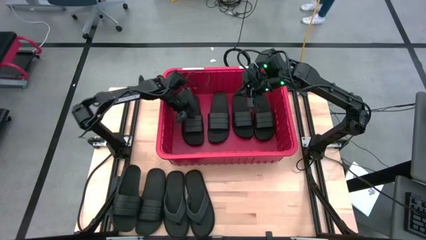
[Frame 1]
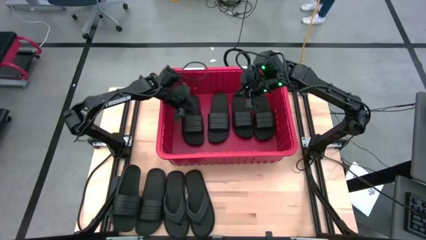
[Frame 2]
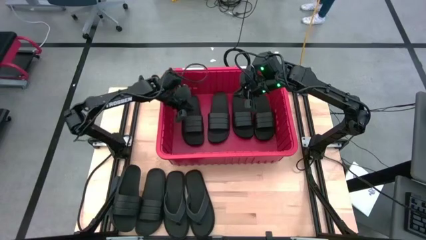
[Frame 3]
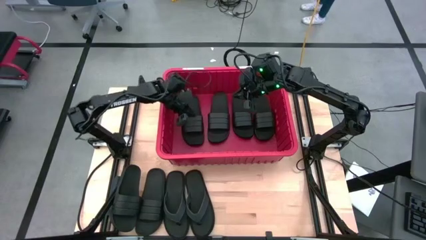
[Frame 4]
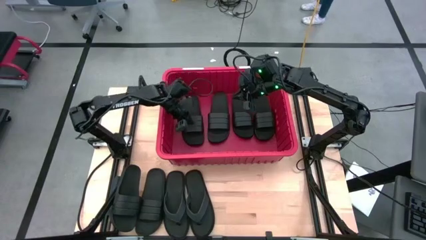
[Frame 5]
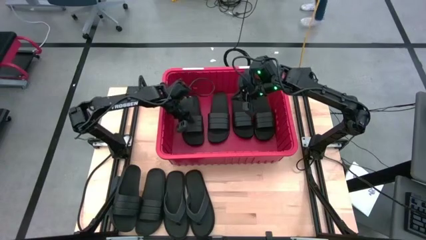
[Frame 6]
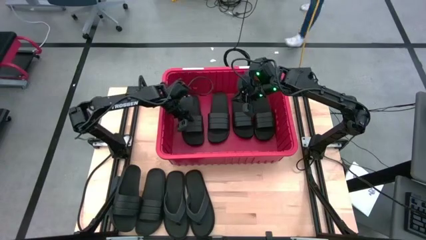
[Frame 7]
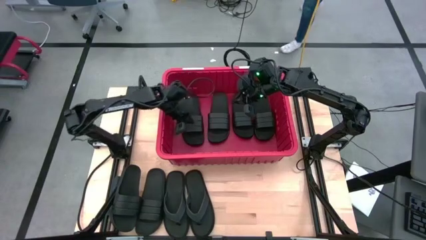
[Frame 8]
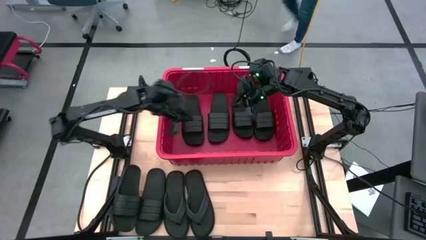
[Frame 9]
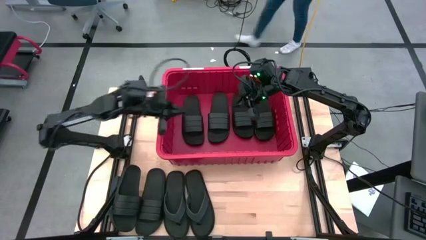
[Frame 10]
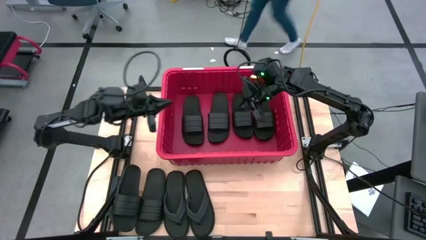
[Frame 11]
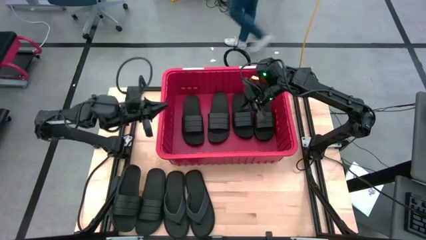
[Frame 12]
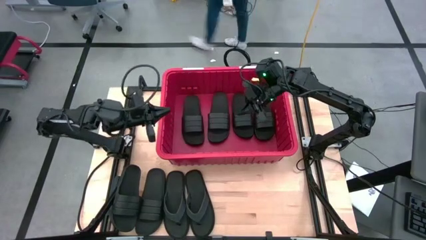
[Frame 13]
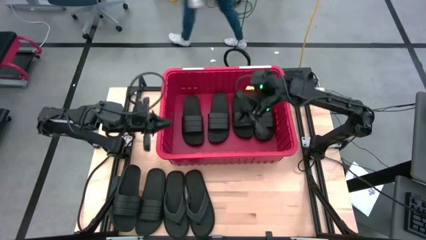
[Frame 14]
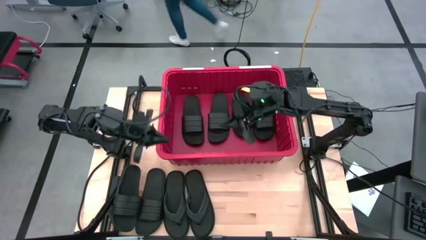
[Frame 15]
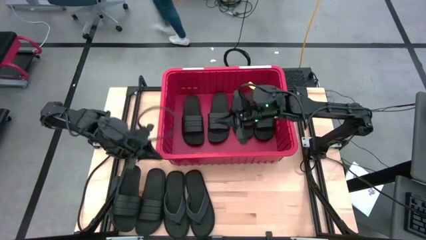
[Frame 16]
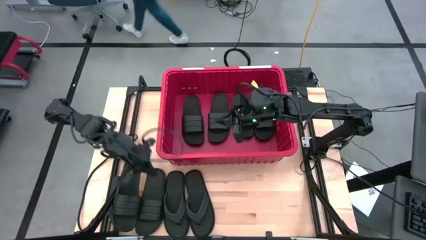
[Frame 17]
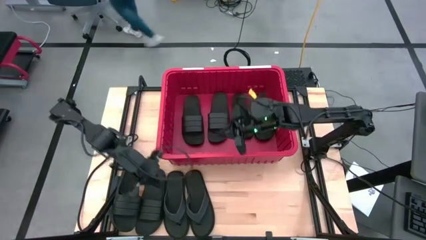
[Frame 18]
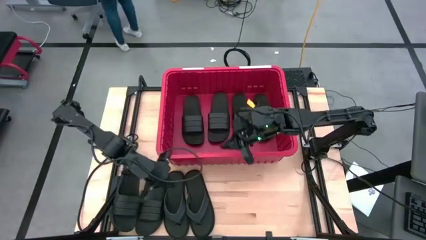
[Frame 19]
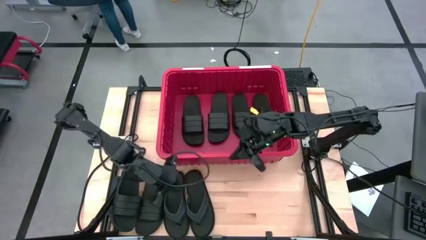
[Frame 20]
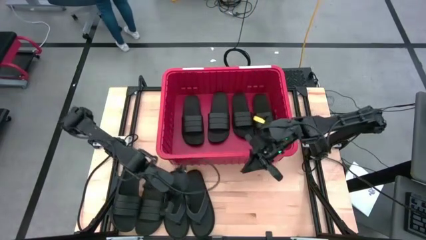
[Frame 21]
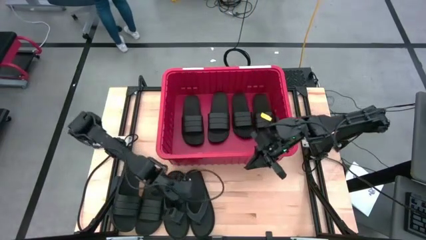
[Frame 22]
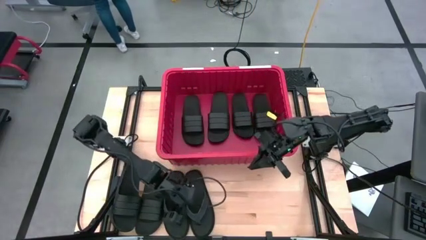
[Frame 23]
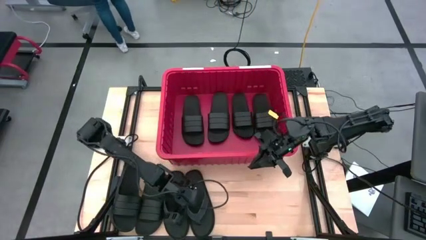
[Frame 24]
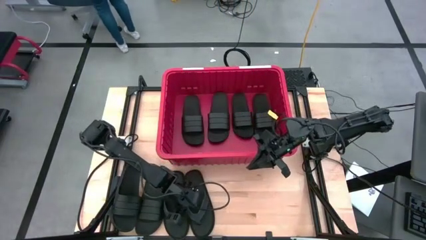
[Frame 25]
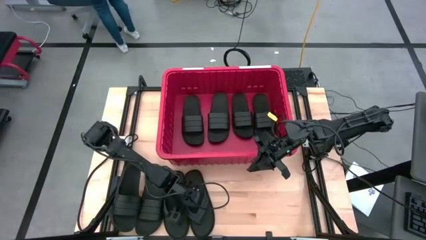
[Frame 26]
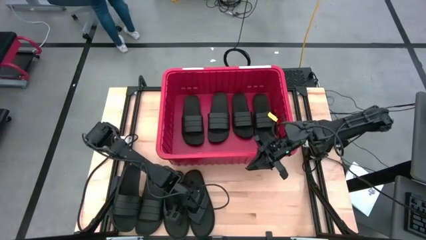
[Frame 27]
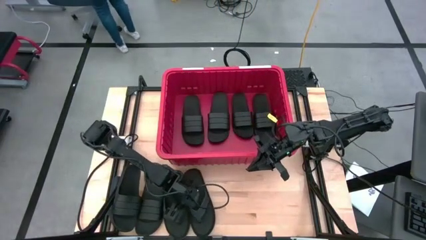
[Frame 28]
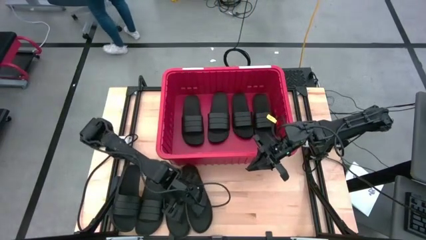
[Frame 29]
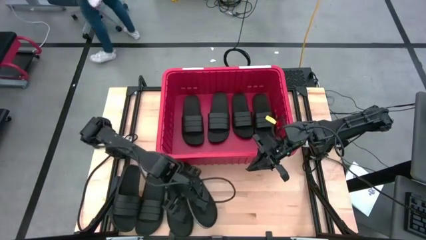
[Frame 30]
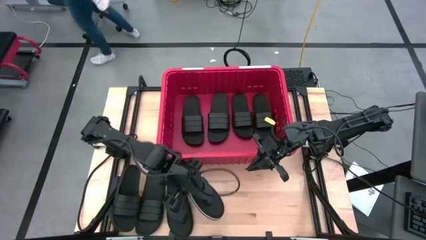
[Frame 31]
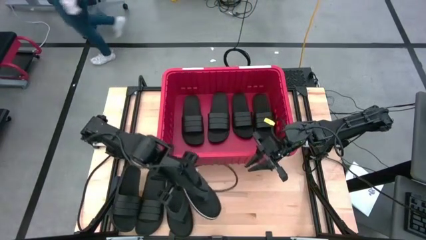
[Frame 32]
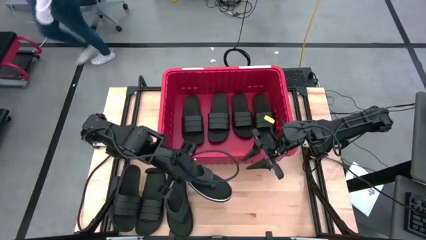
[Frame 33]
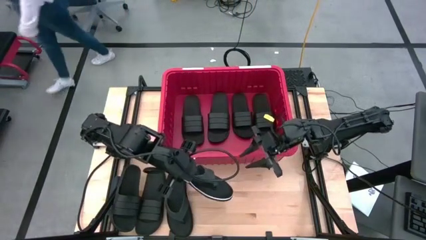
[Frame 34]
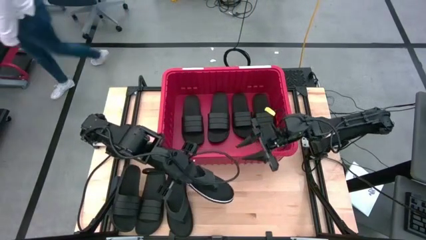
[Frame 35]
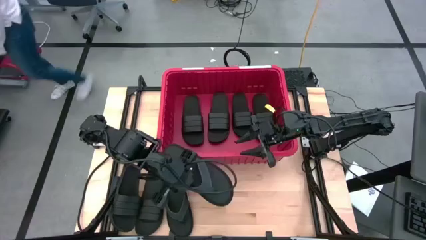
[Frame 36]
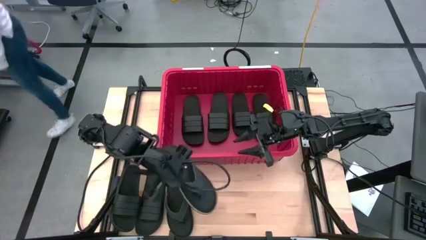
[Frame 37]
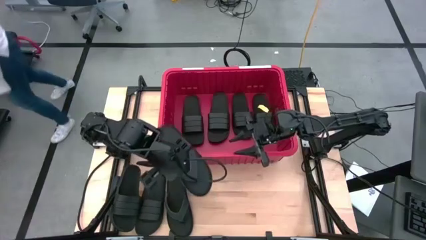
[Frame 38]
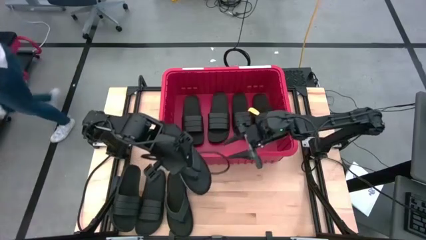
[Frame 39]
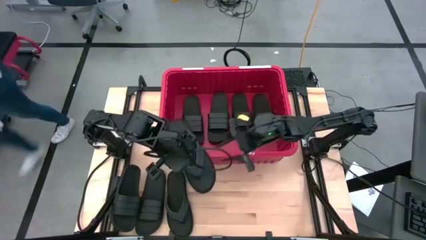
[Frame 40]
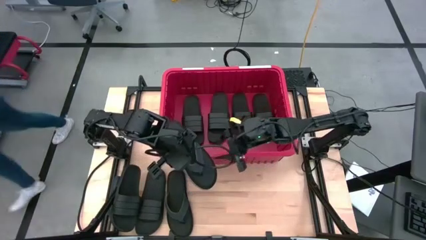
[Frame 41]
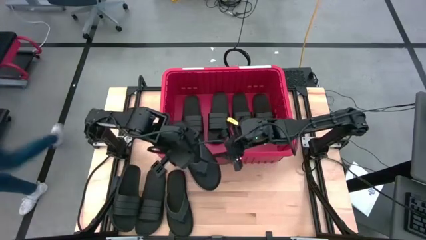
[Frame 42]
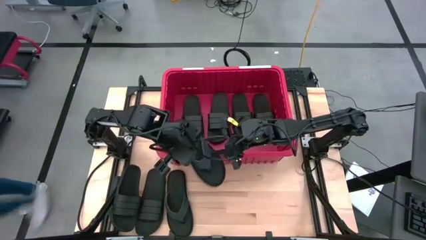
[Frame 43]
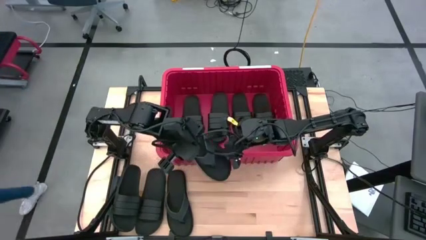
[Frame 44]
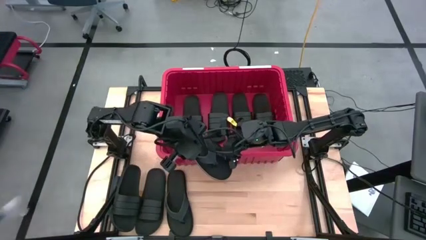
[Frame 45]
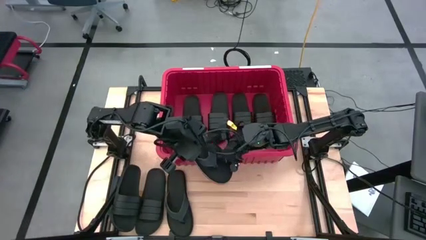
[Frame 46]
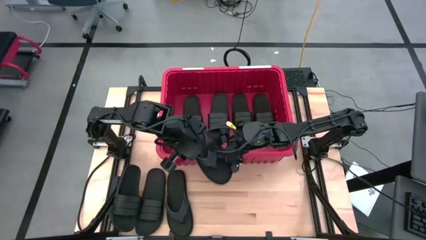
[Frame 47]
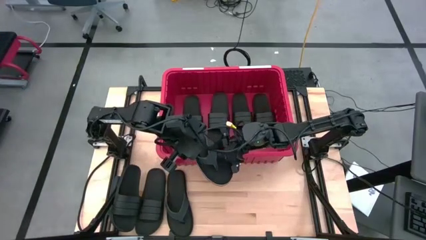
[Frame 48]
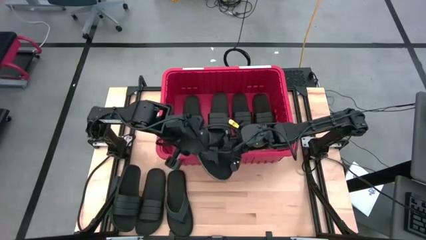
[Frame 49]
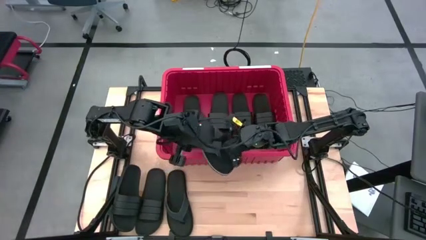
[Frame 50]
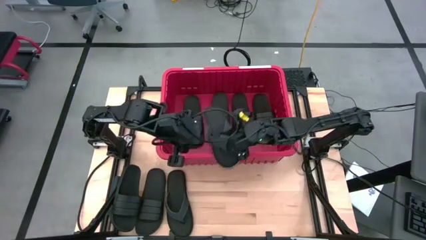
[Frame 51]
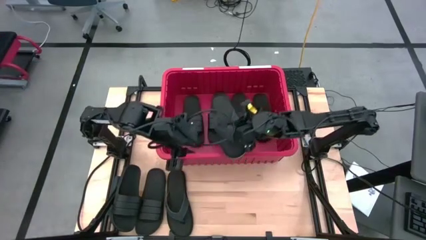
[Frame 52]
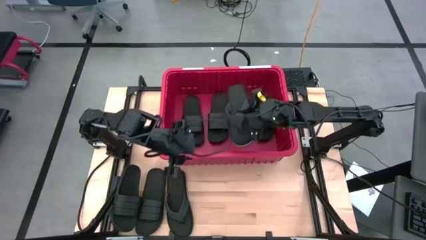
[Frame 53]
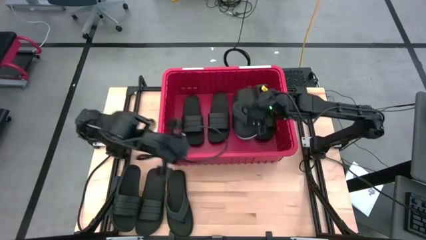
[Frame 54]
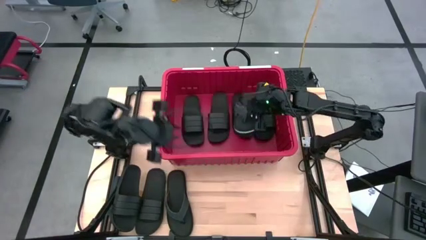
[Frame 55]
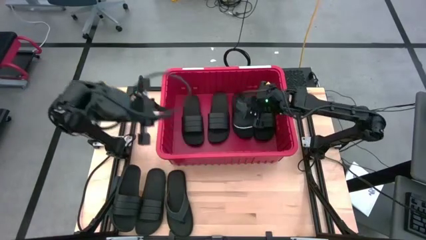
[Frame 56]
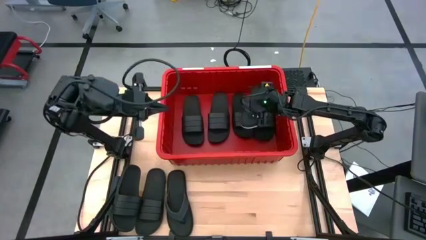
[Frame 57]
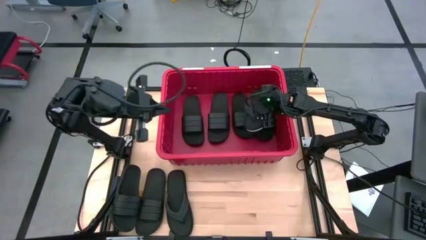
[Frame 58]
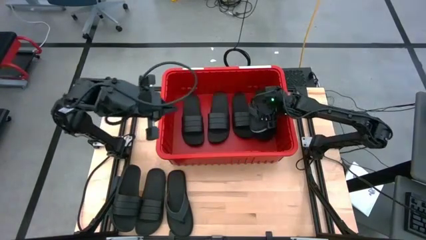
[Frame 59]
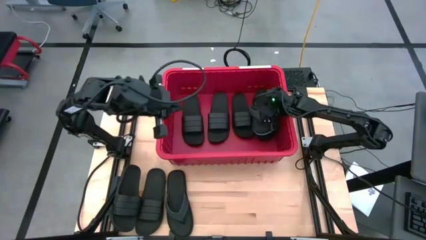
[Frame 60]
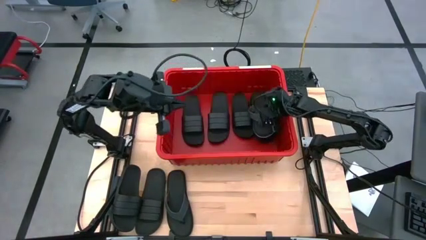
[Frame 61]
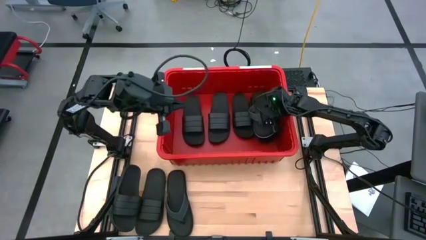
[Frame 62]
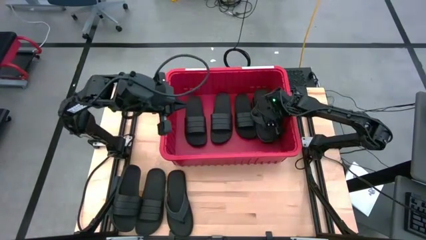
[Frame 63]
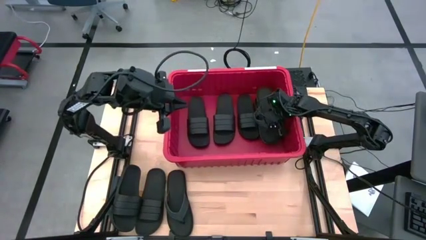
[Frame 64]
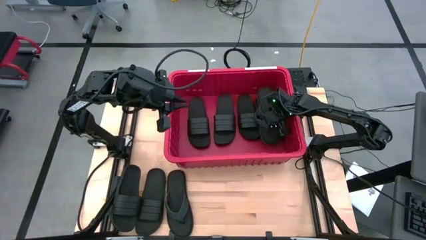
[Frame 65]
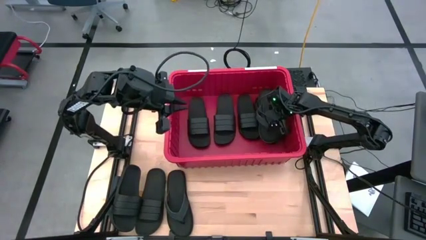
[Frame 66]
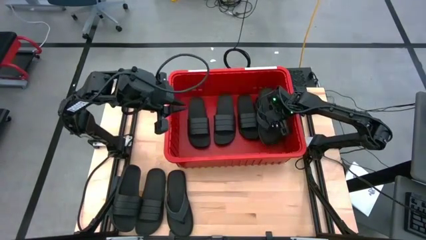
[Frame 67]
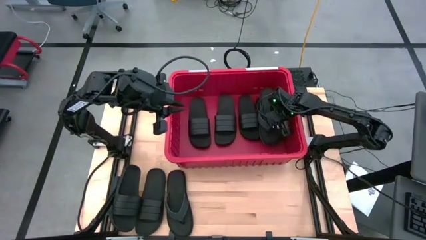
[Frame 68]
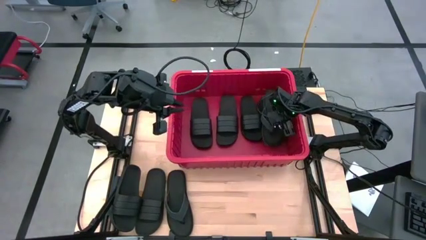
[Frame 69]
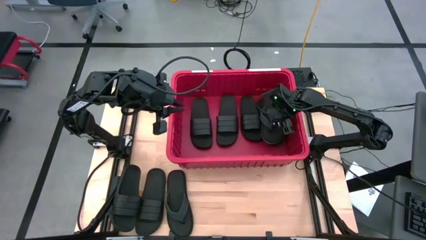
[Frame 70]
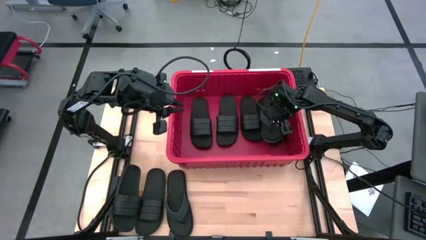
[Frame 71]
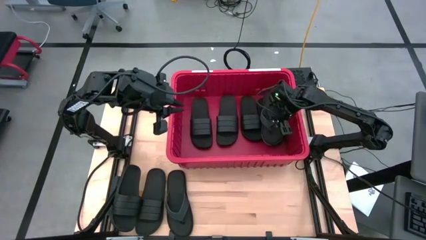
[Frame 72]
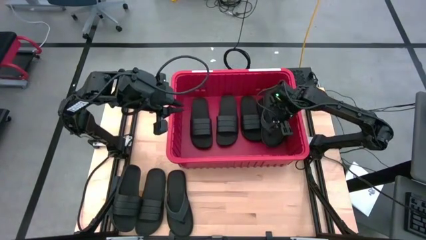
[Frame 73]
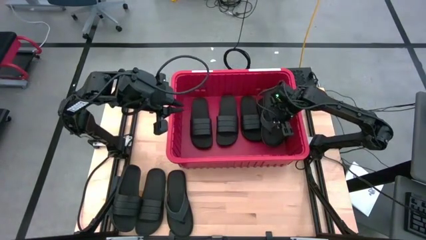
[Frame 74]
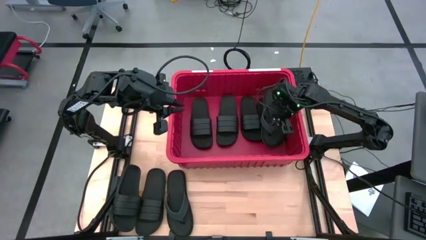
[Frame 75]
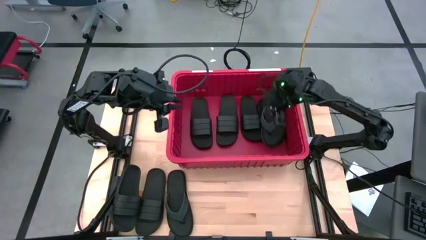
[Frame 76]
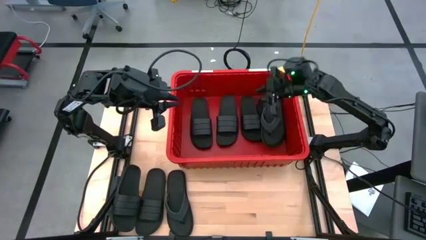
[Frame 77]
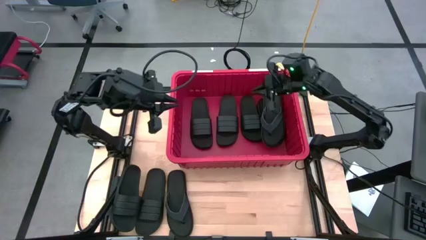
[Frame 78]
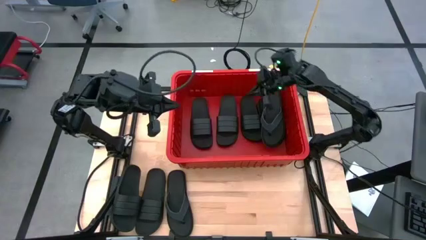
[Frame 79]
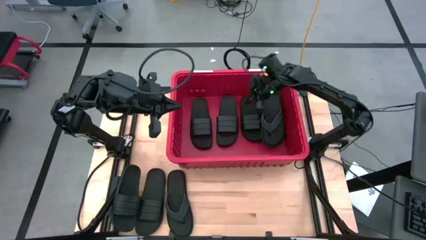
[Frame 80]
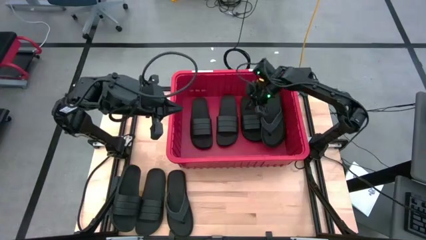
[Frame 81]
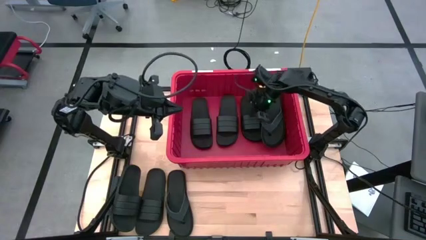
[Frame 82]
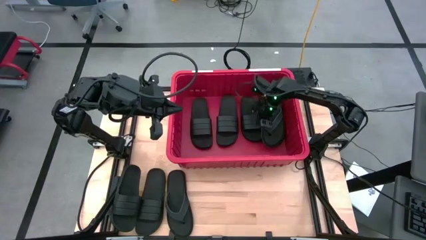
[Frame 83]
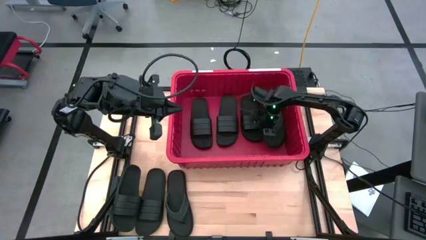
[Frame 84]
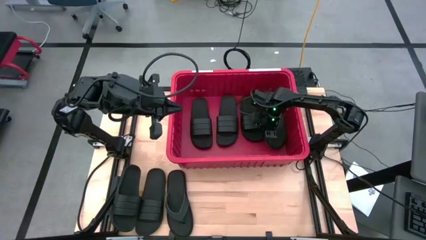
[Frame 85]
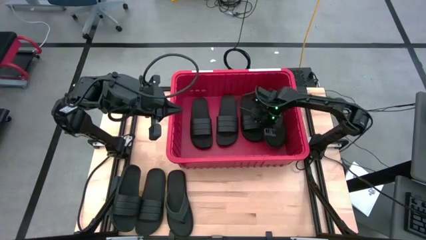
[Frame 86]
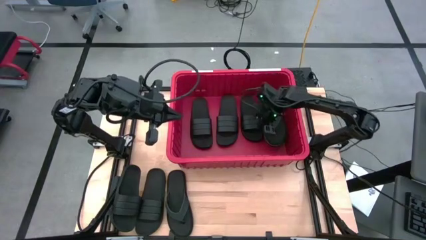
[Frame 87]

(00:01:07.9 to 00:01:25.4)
Task: Pick and place slides into bin
Stack the black slipper on top of the black slipper
